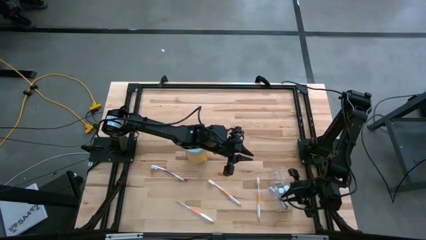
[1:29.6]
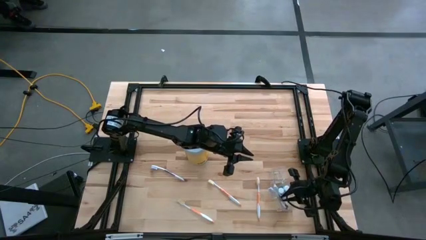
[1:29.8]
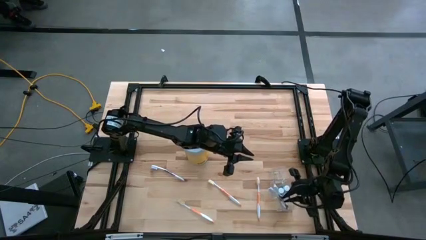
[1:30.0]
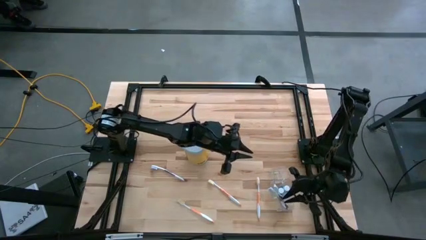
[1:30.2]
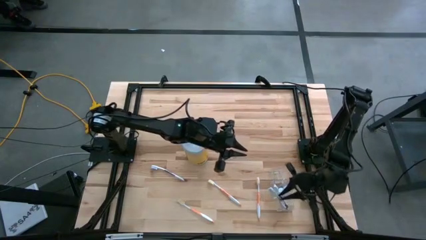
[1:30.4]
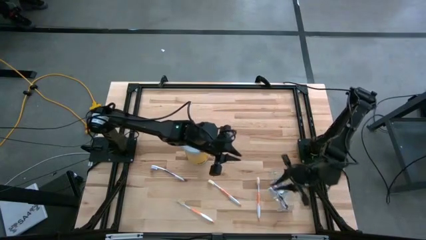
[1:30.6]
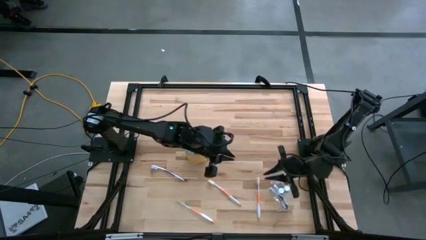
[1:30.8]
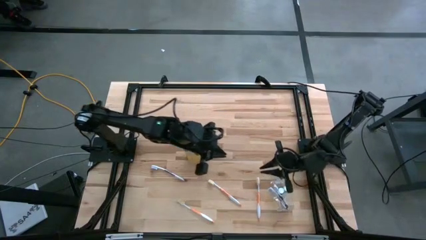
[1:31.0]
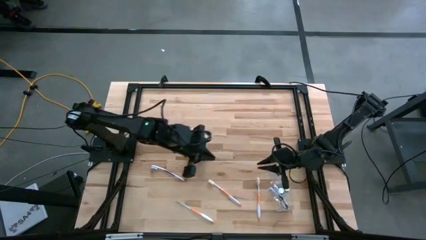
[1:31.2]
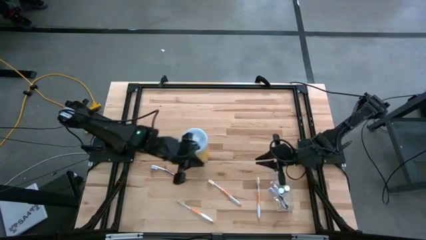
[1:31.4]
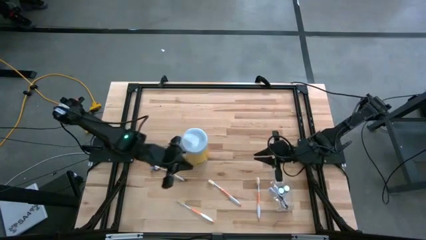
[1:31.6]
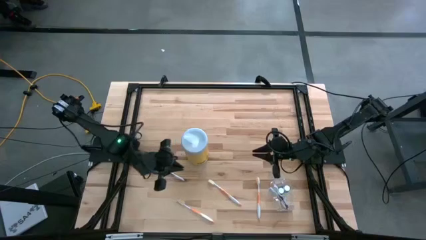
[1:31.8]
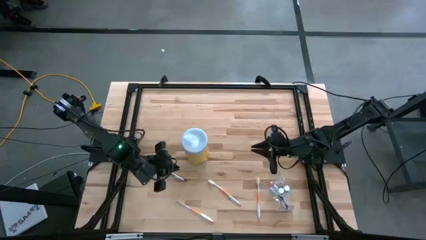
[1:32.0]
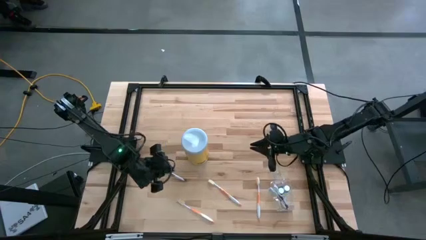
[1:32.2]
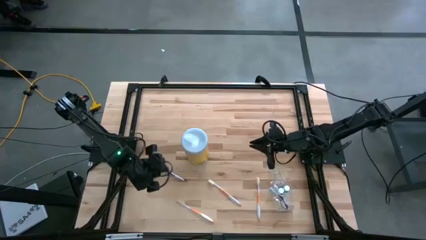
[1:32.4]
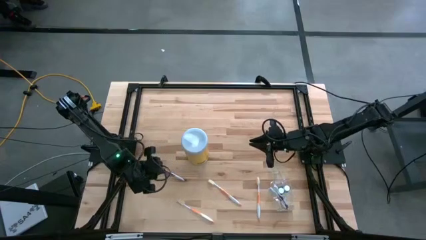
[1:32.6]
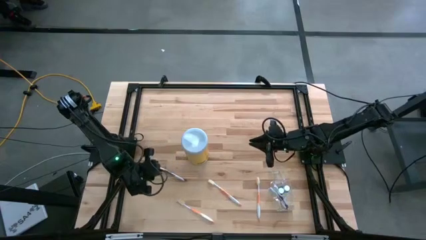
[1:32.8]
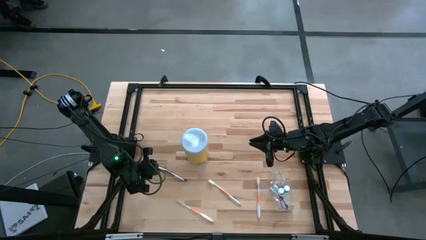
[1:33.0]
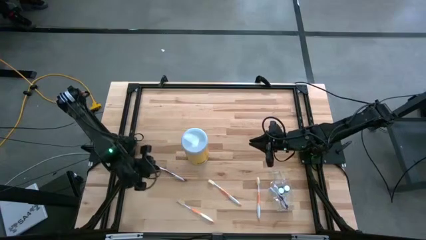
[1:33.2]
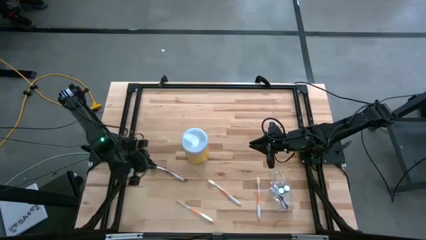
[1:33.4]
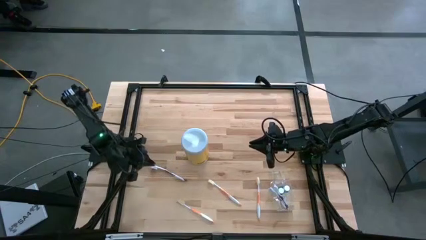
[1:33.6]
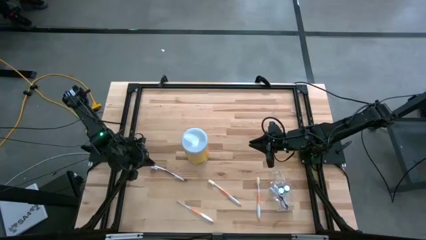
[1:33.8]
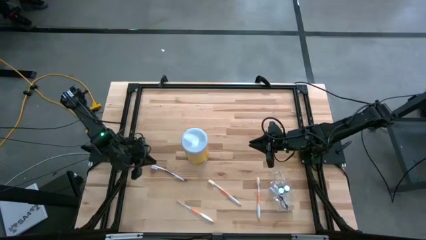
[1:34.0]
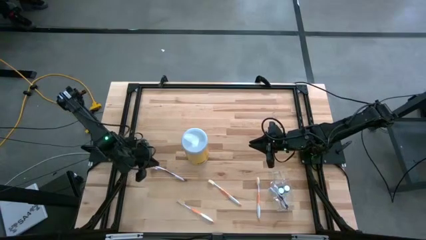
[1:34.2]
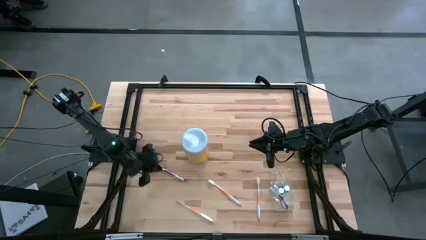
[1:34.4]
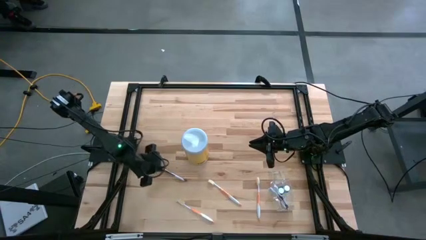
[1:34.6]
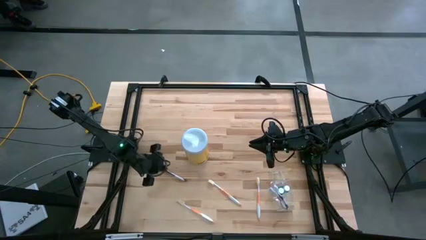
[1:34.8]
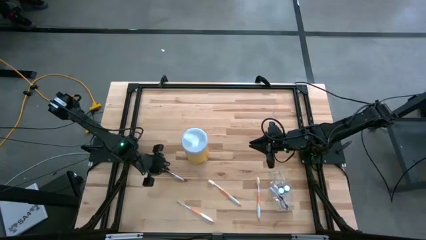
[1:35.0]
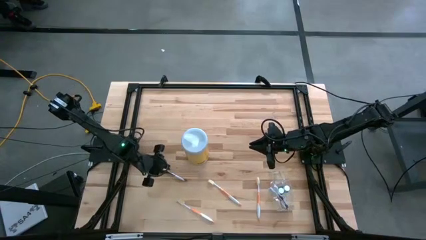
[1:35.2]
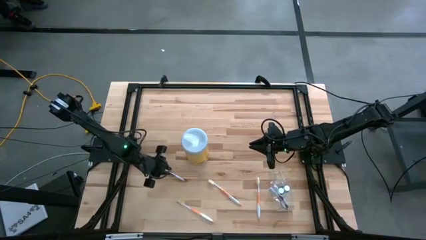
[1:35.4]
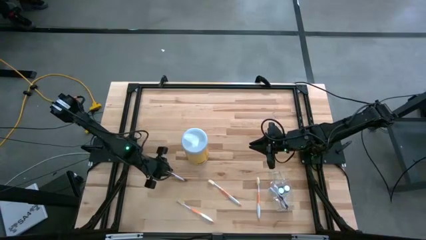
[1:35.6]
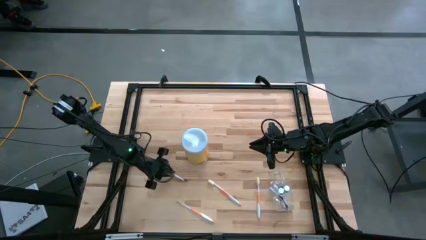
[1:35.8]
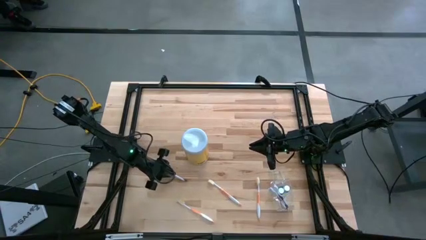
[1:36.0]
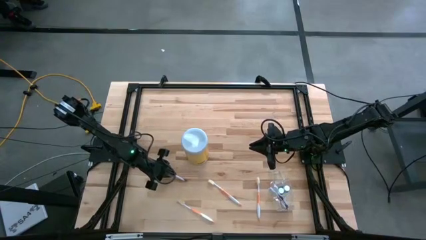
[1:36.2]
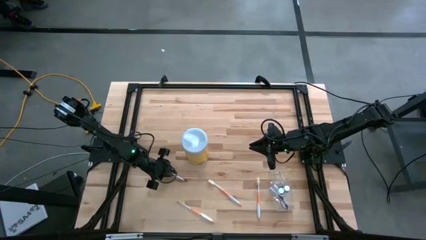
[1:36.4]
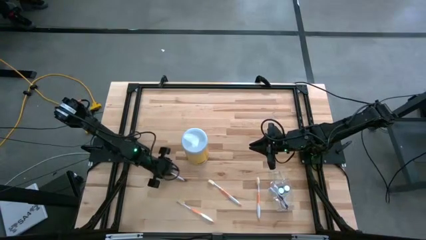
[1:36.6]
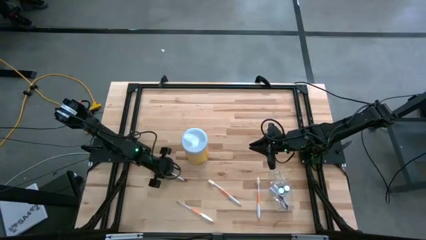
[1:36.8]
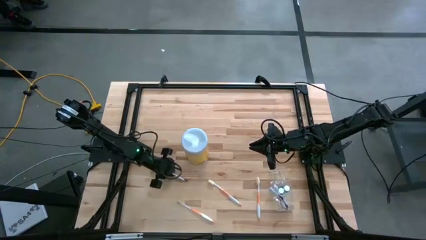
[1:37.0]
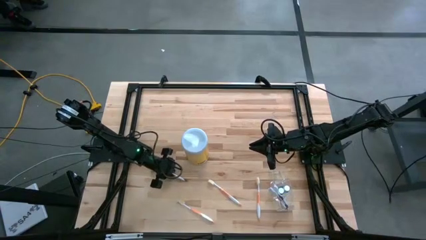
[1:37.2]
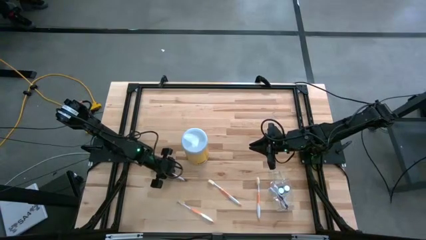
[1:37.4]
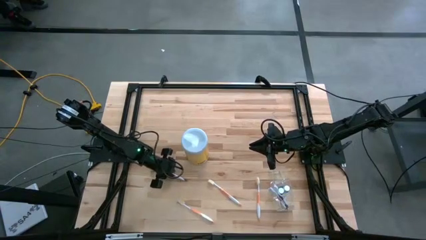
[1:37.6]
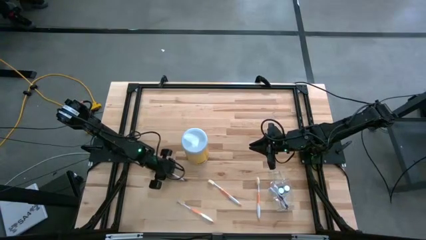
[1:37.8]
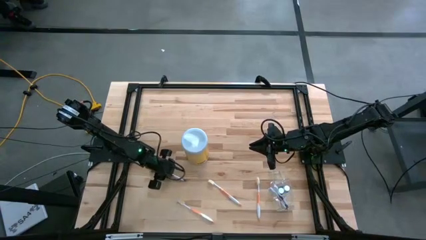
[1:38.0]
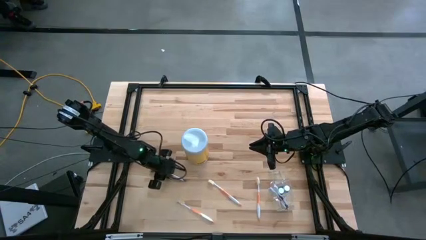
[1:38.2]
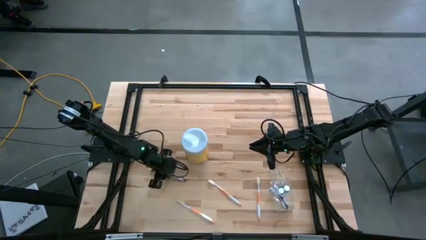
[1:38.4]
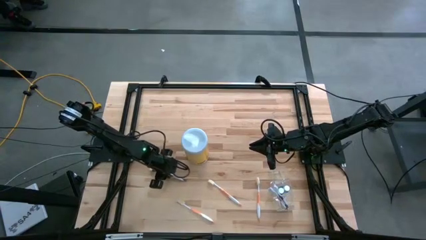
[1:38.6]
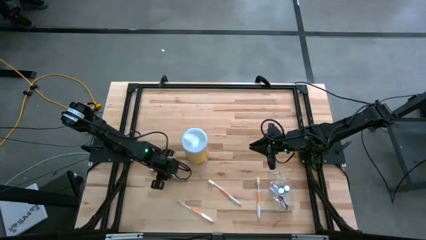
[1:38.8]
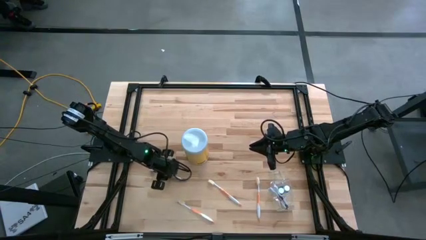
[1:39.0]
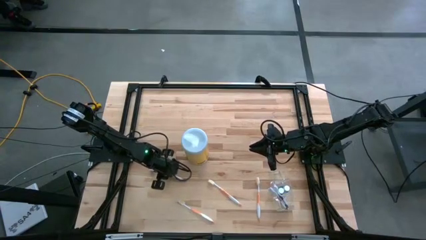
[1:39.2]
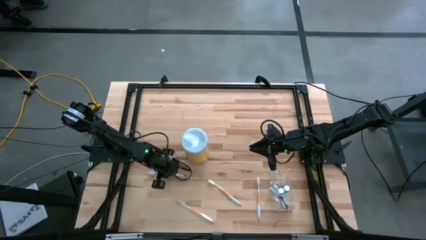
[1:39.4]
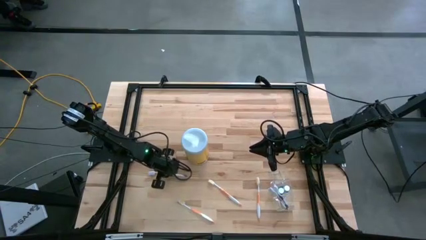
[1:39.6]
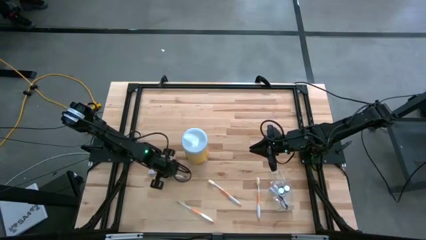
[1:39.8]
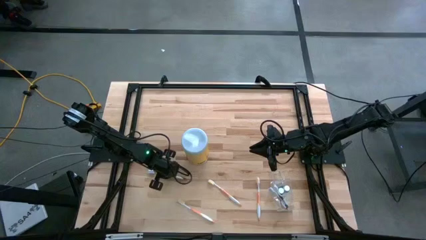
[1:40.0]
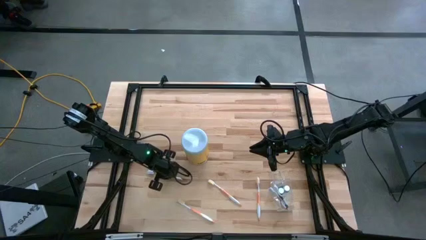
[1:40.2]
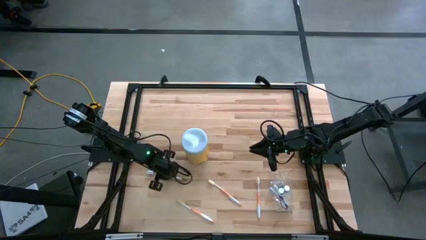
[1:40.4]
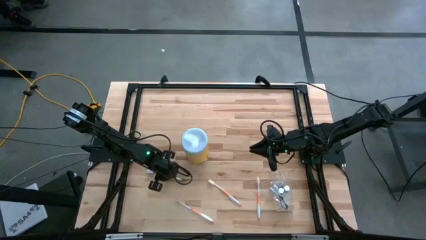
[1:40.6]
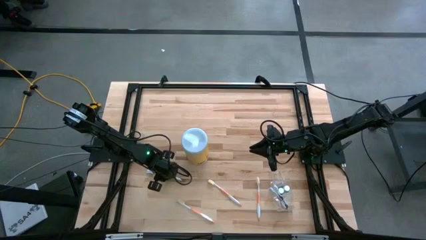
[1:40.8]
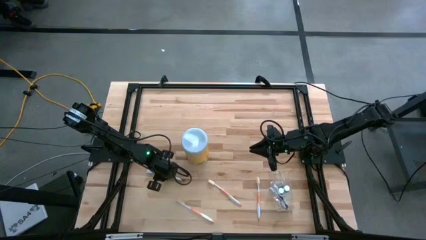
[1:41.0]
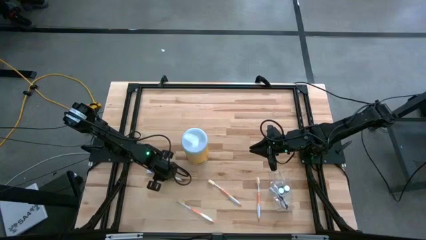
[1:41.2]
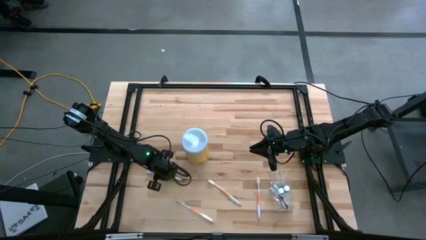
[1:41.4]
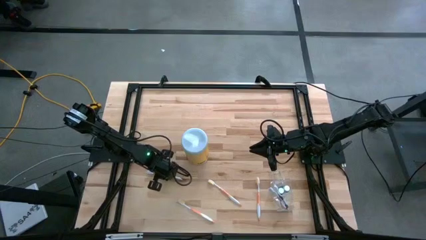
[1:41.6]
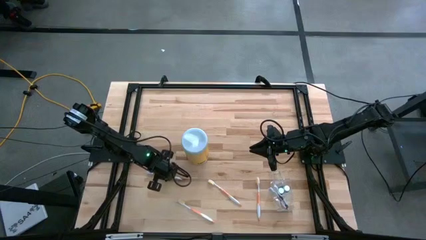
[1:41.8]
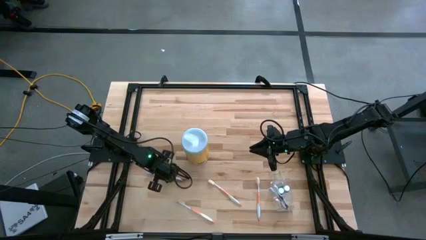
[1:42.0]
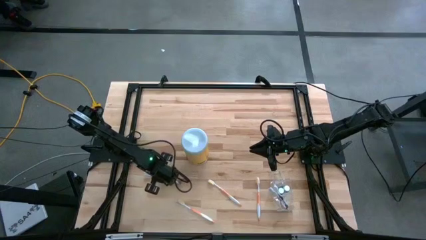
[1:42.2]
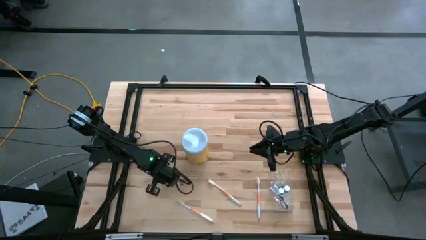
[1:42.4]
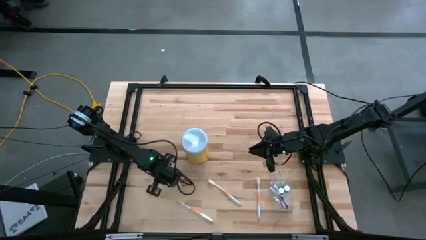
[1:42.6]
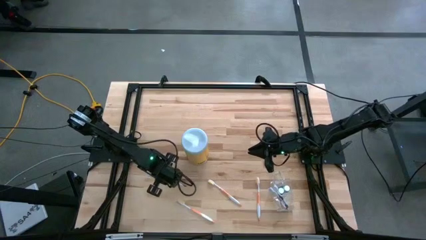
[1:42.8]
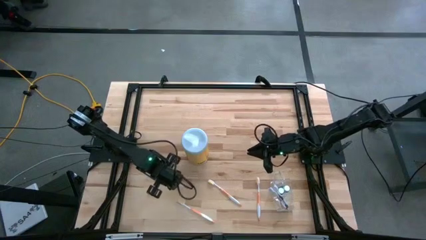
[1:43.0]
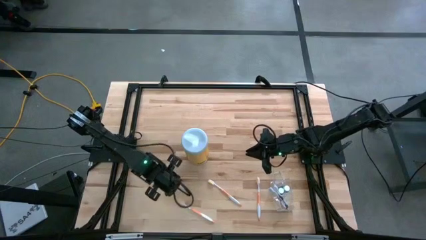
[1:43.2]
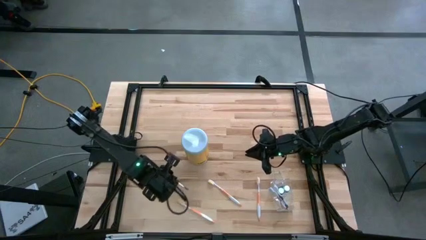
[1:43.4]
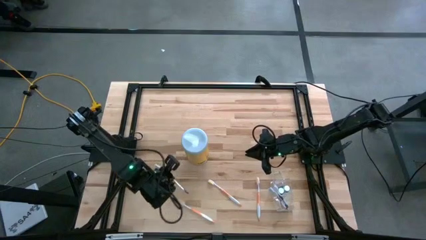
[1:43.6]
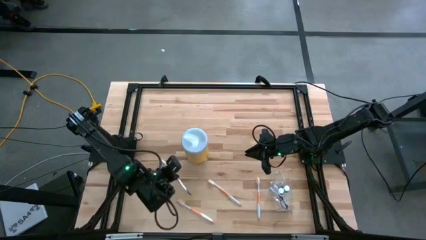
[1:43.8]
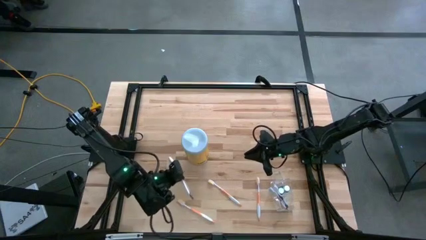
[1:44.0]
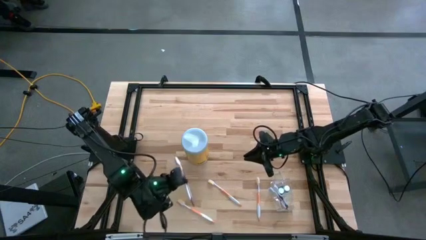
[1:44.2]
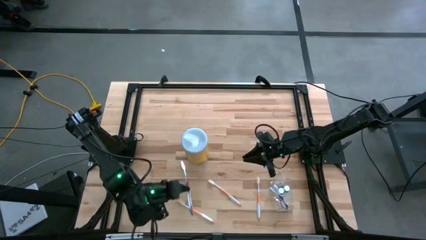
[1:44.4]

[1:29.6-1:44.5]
Task: Pick & Place toothbrushing station
Put the purple toothbrush in the bottom section of the transparent organizer
